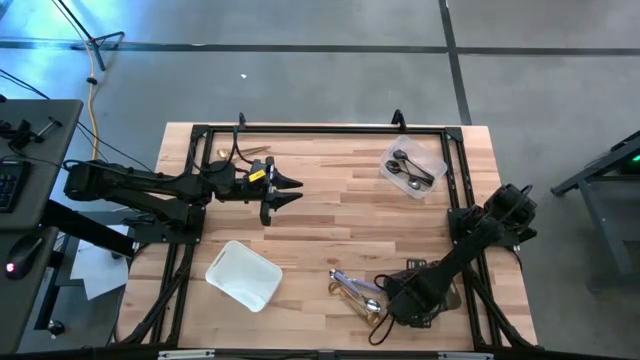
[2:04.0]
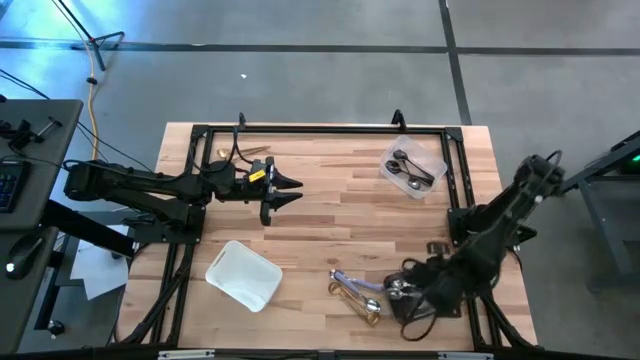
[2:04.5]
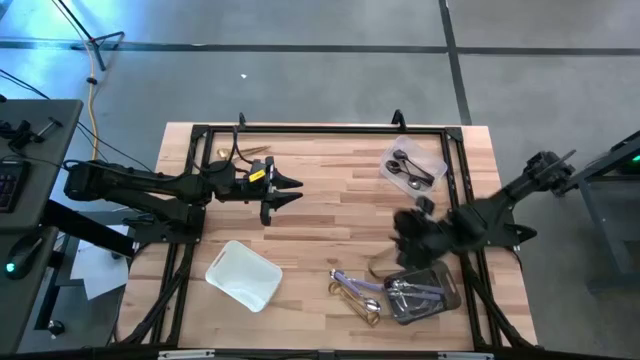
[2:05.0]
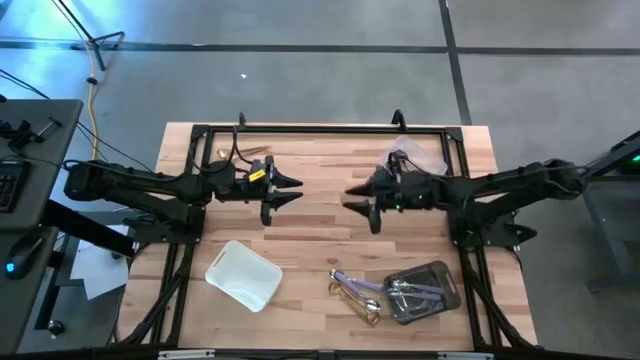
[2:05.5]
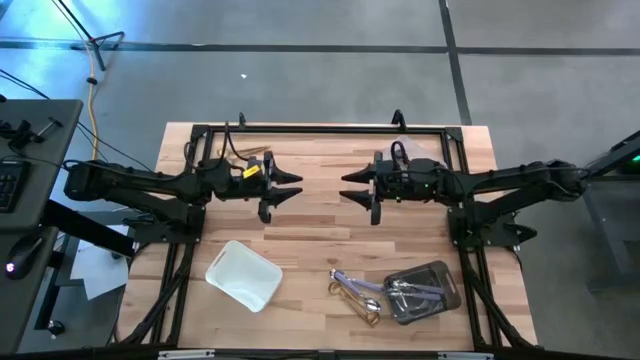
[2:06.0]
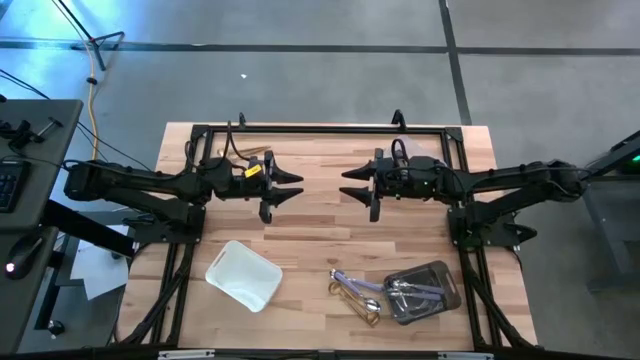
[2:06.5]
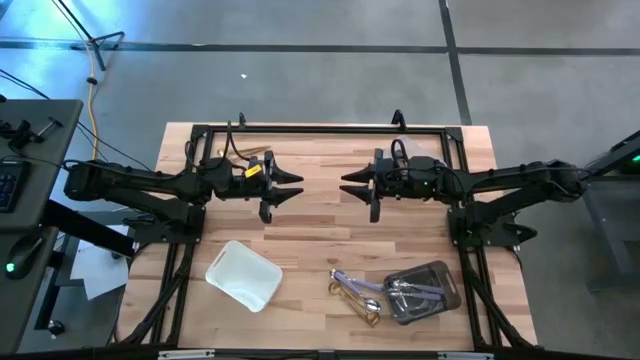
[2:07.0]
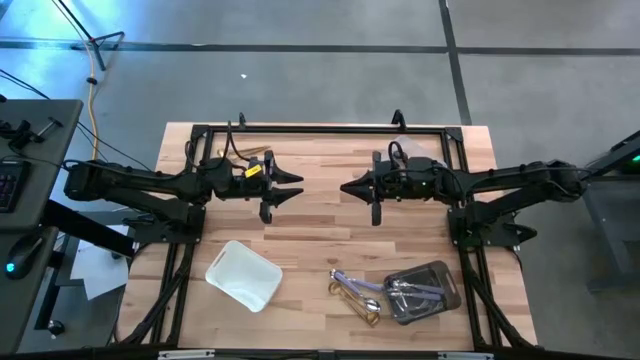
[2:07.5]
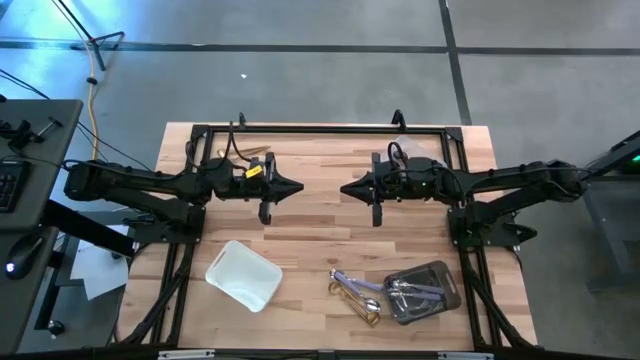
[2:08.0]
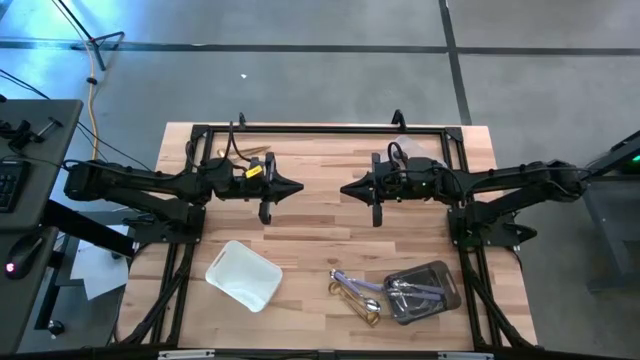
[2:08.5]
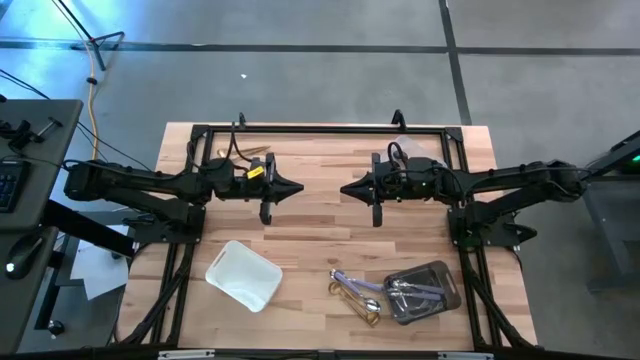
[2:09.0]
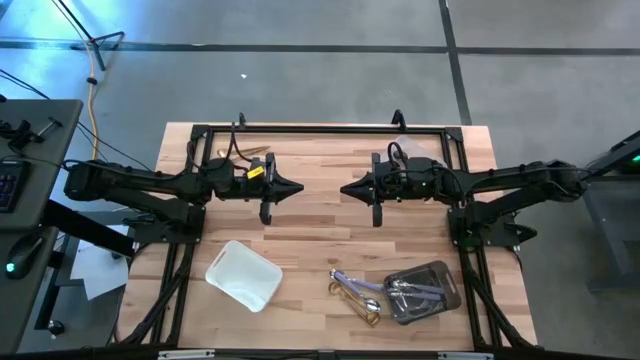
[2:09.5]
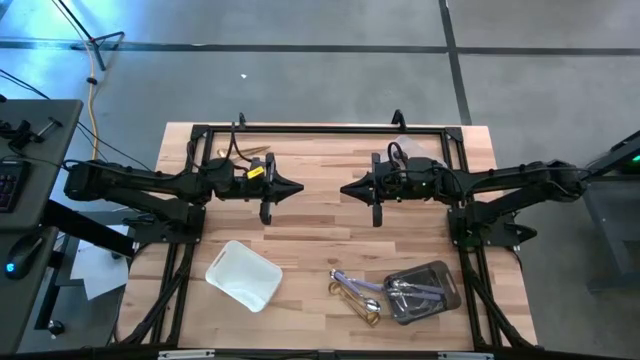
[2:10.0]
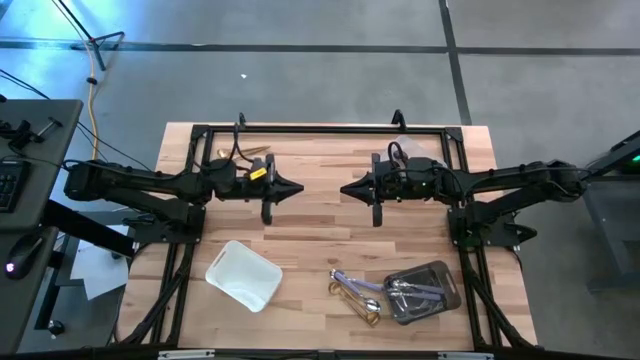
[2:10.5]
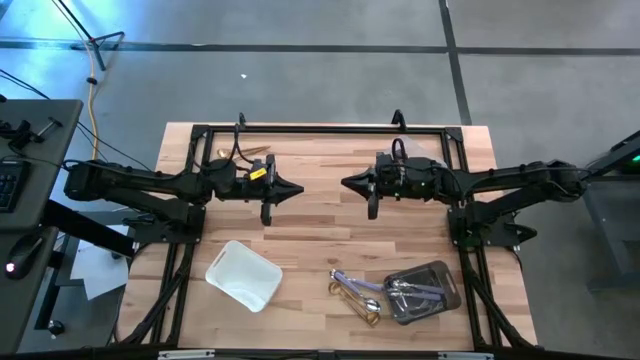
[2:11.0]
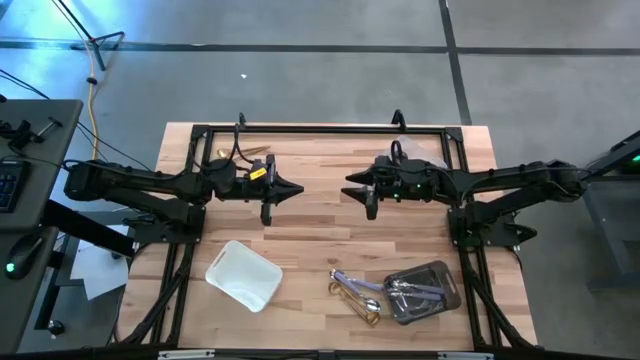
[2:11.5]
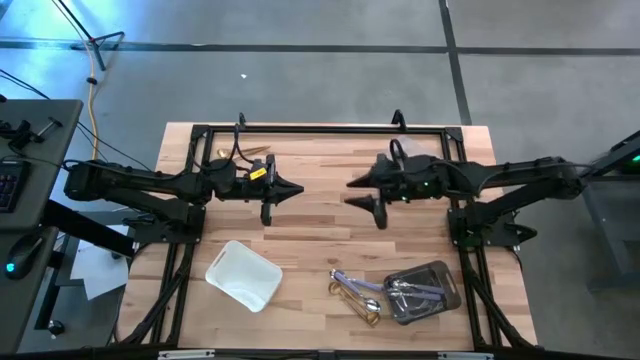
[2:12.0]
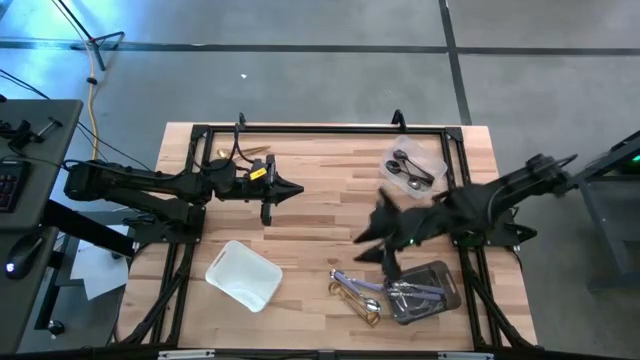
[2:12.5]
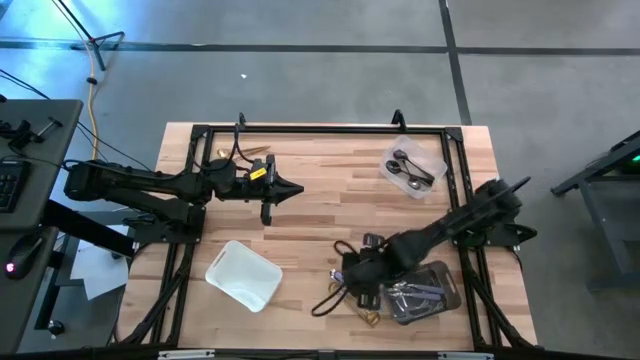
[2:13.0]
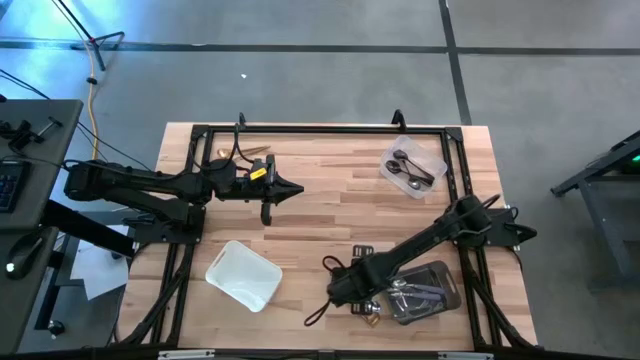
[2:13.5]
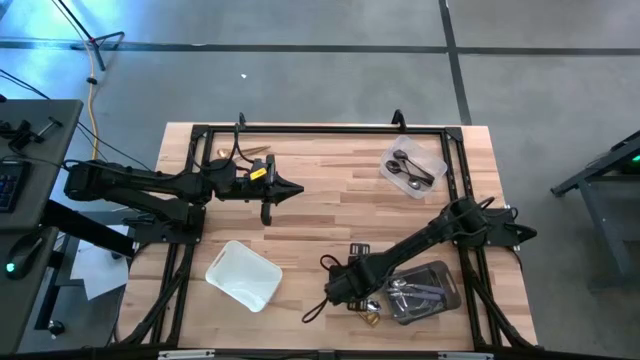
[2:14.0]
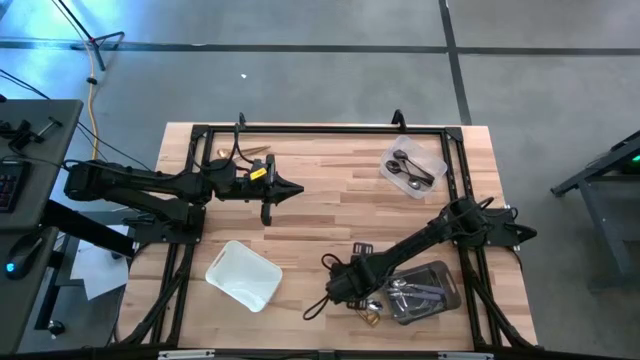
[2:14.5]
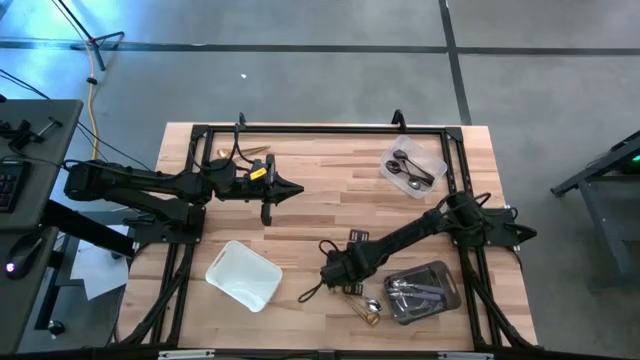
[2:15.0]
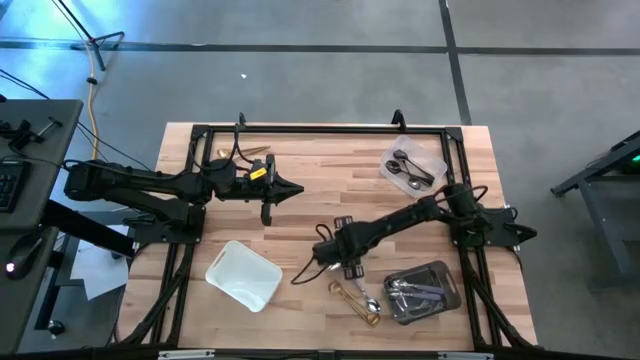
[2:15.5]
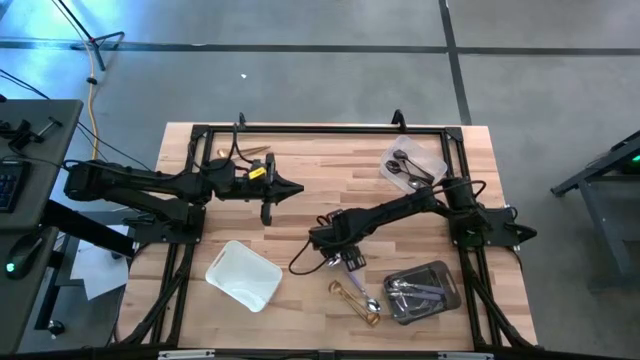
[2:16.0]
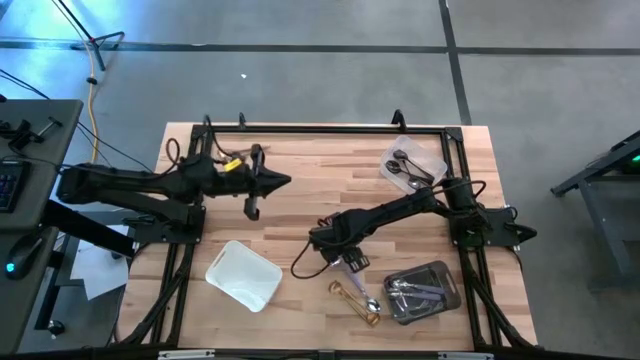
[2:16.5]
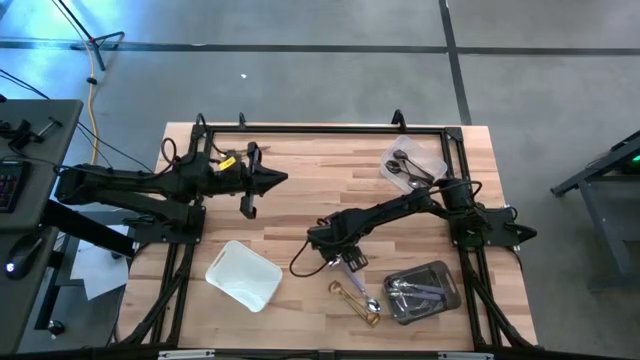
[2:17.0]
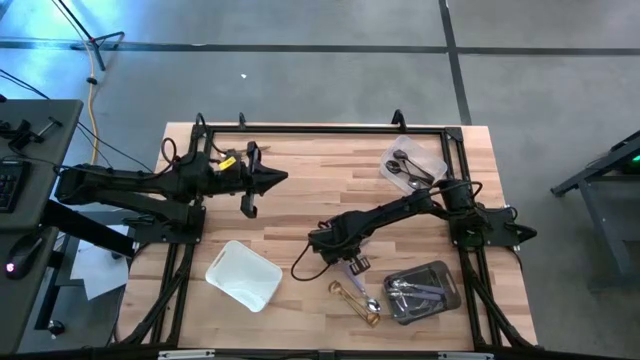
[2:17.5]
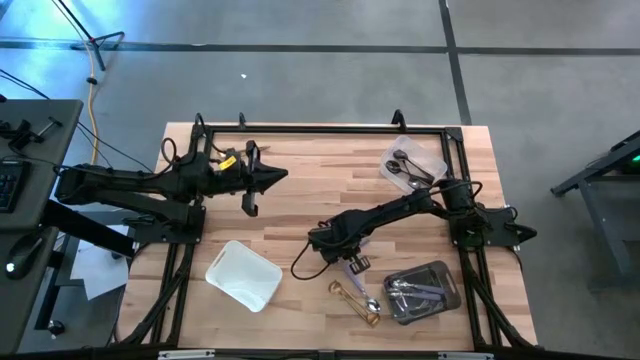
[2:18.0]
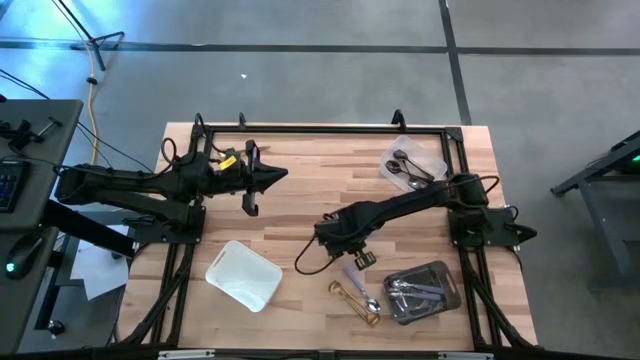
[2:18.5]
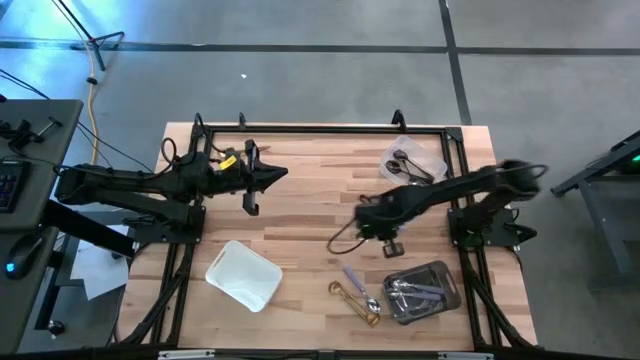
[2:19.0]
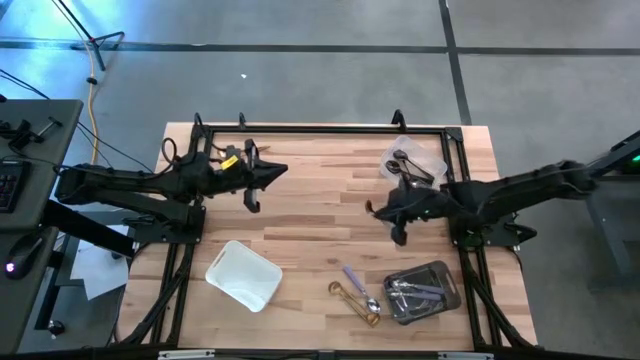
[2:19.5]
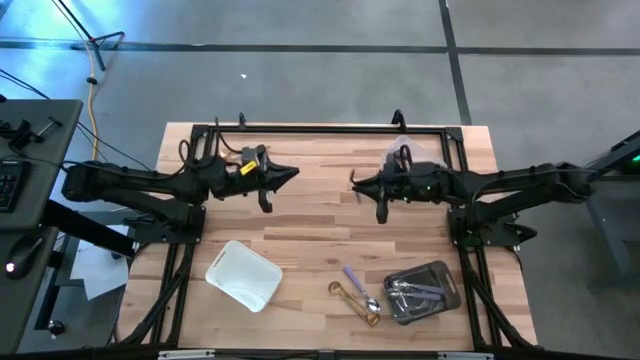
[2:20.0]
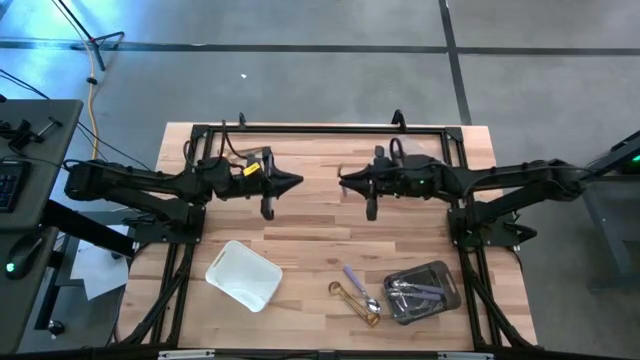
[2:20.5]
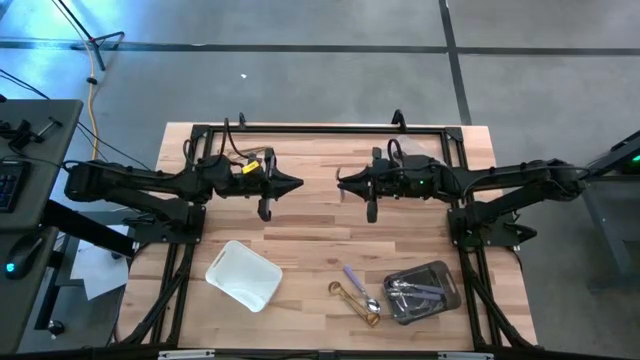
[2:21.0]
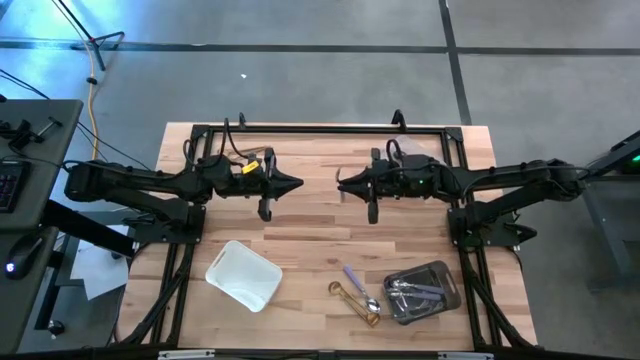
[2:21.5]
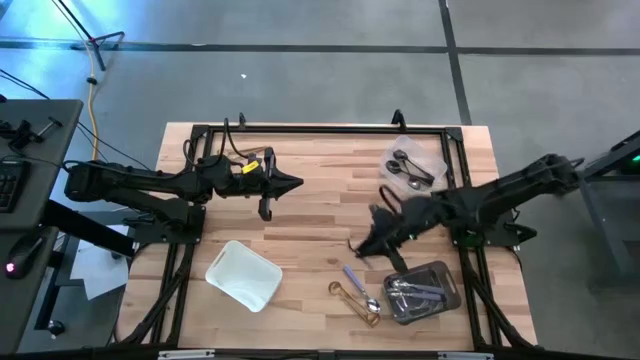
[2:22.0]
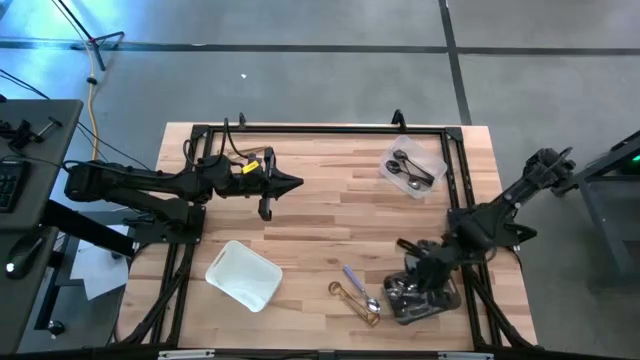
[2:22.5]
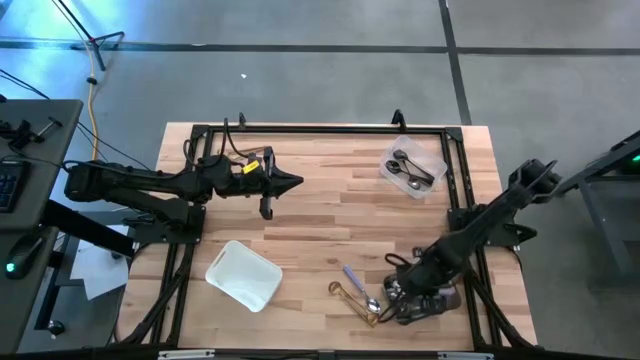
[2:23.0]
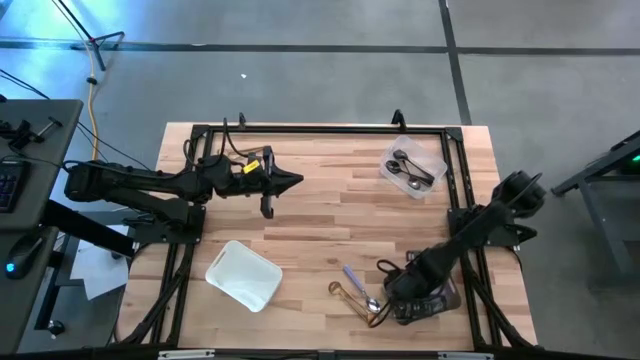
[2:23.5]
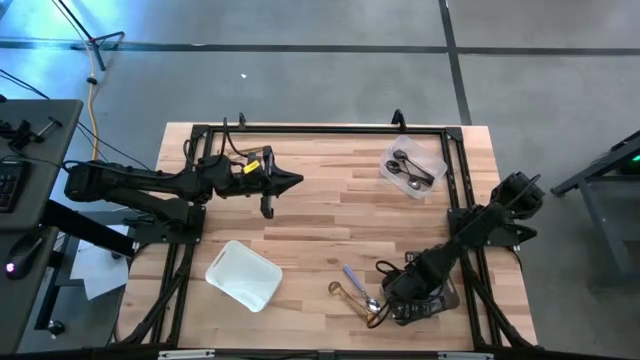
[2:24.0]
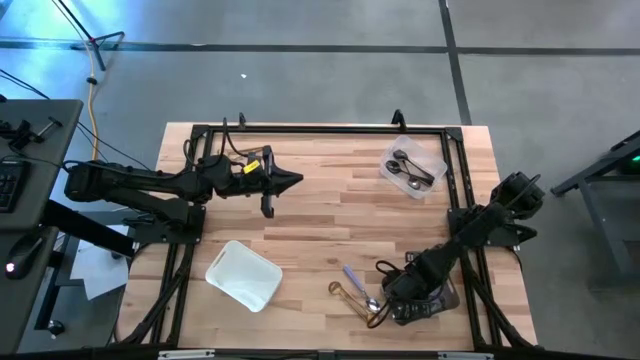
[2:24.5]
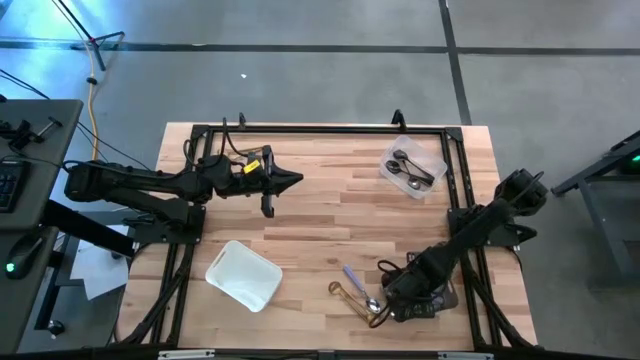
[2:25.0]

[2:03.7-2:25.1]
Task: Sort silverware by color (type)
Put the violet spoon into the black bin
